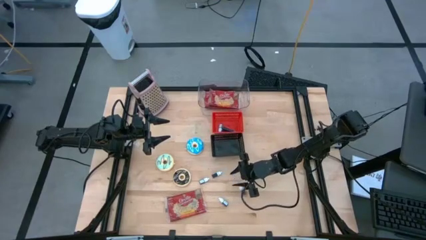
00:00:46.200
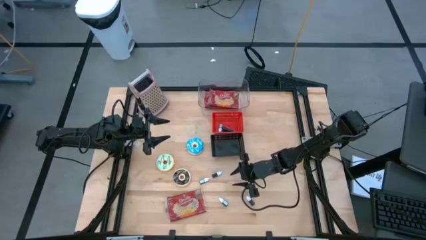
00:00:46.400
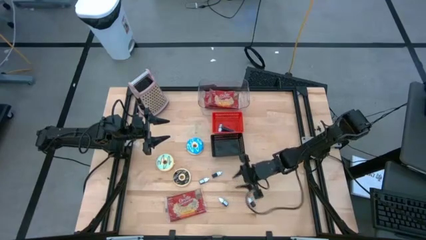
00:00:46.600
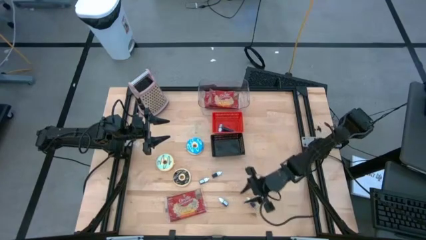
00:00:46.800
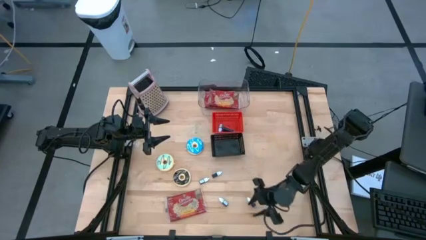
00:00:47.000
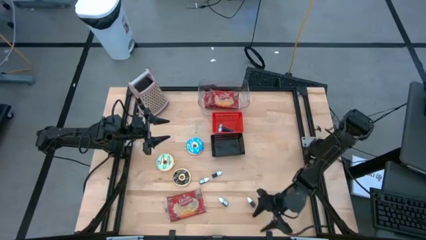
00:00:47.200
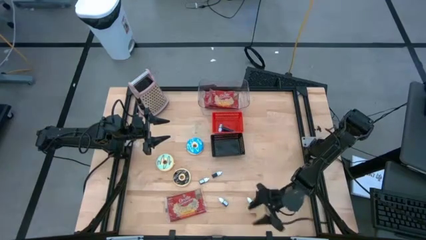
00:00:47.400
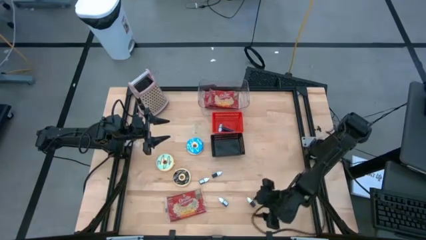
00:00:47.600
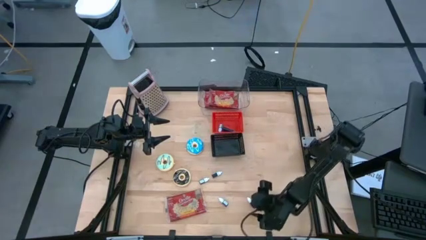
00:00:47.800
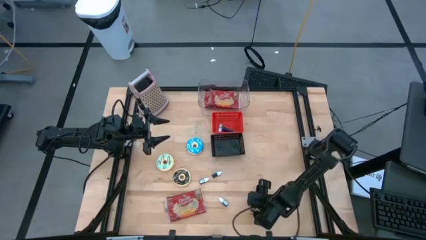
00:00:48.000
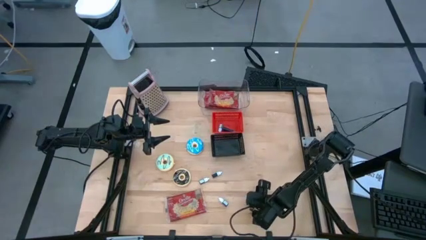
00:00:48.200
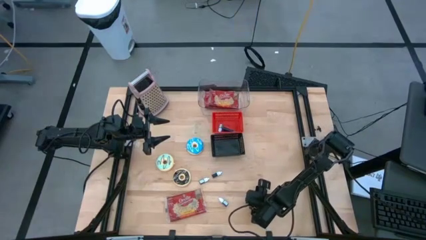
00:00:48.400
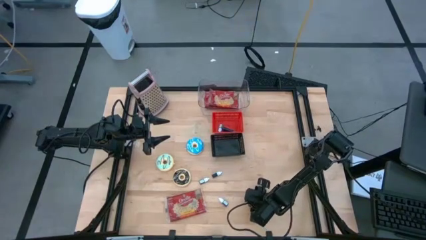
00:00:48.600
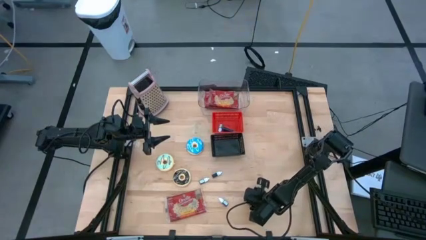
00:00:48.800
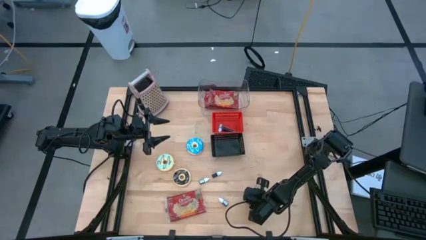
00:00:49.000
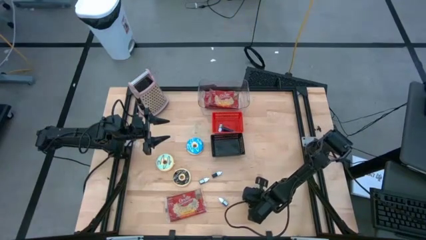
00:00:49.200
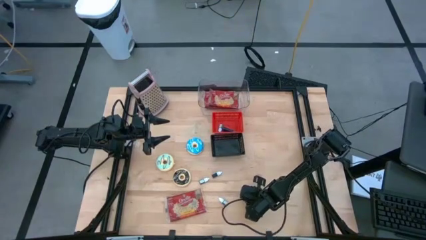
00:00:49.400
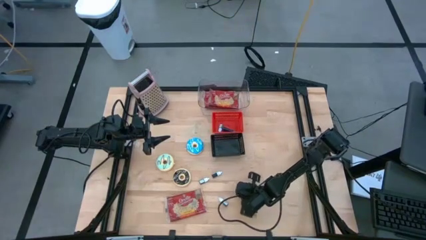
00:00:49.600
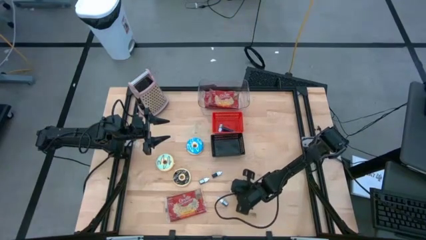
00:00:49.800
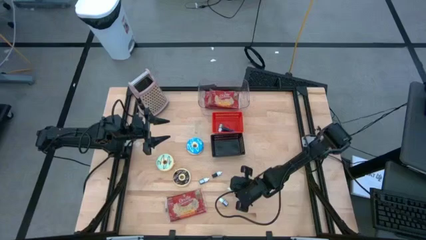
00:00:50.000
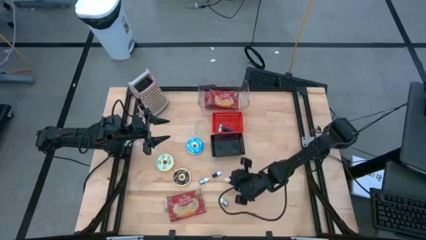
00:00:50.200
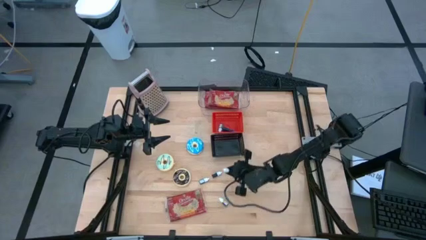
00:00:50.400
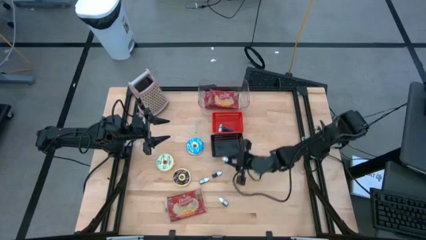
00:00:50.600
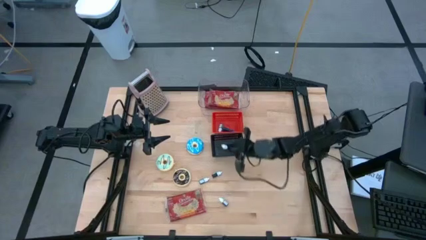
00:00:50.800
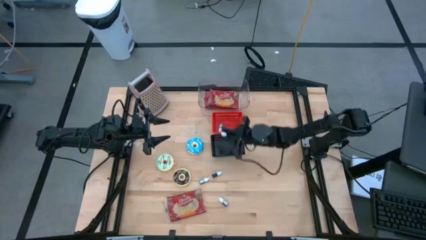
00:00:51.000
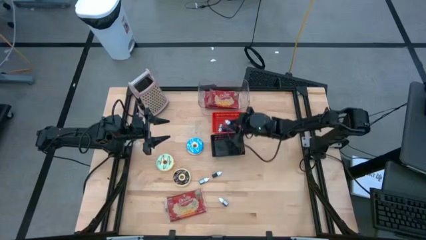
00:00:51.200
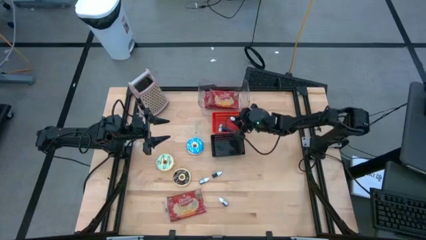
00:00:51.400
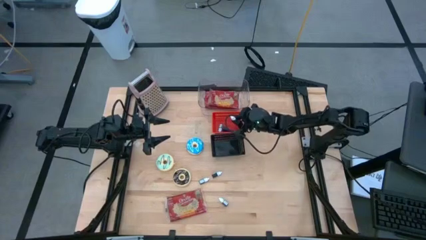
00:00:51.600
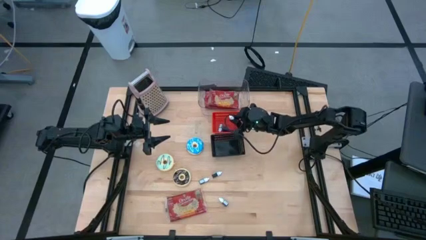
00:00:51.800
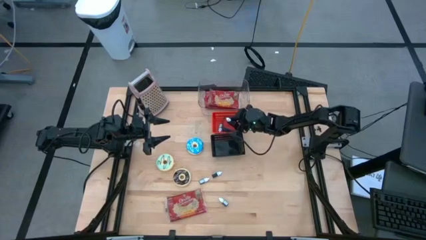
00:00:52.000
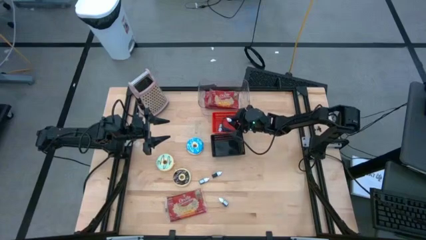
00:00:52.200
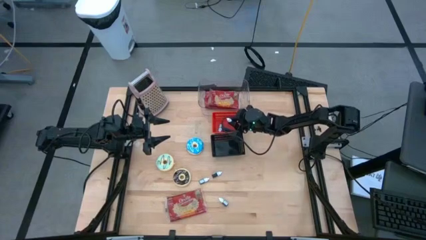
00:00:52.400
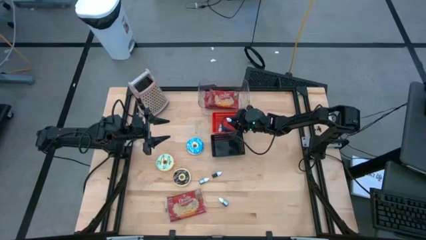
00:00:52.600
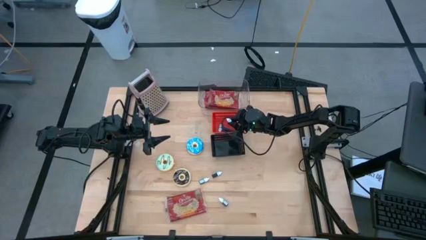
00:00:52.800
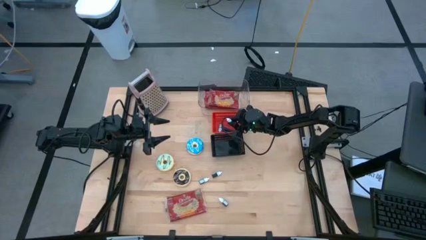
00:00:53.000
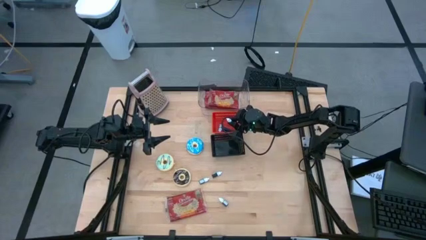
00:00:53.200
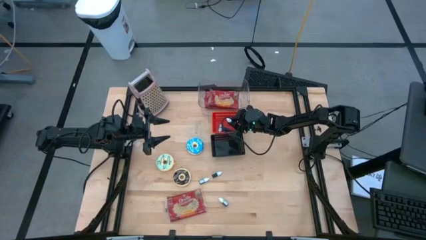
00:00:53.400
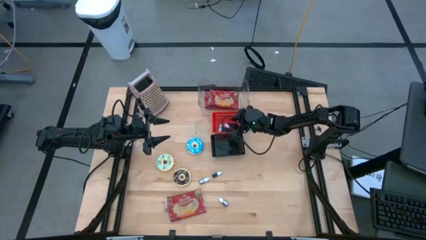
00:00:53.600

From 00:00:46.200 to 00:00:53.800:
Put the violet food coloring into the red bin

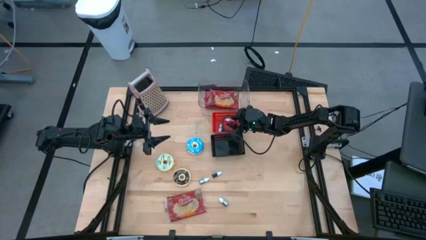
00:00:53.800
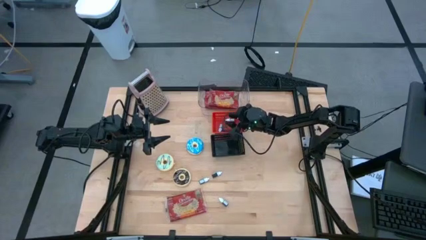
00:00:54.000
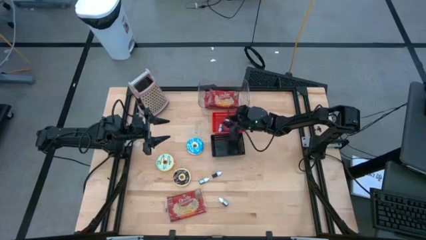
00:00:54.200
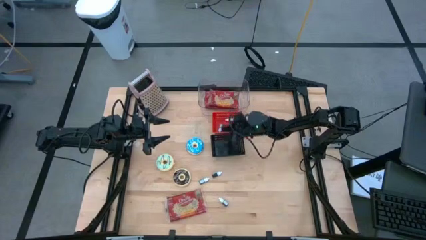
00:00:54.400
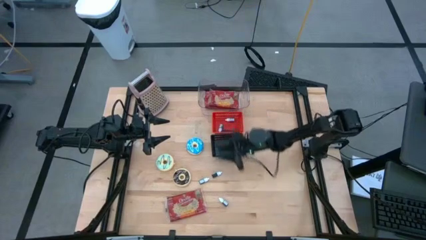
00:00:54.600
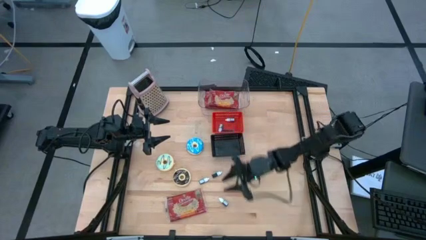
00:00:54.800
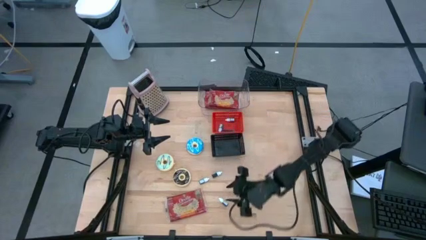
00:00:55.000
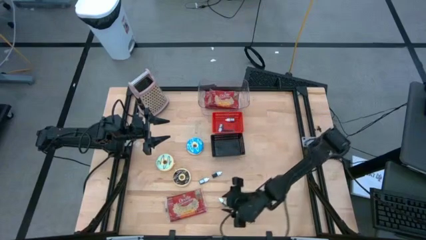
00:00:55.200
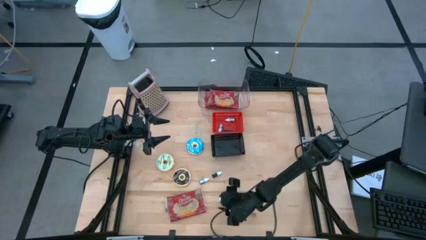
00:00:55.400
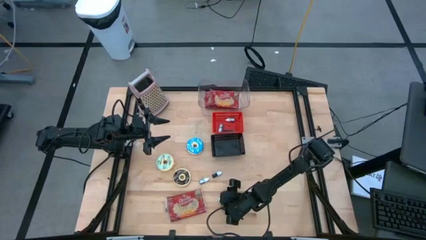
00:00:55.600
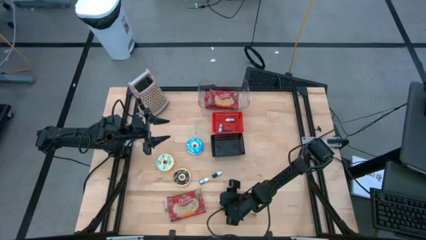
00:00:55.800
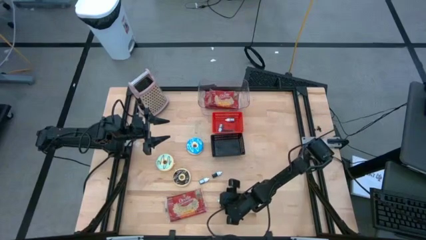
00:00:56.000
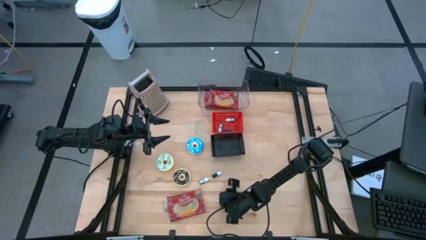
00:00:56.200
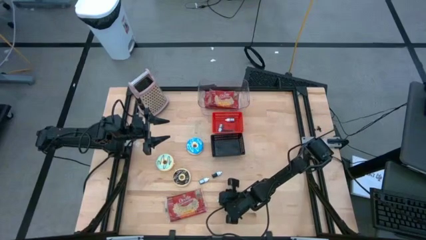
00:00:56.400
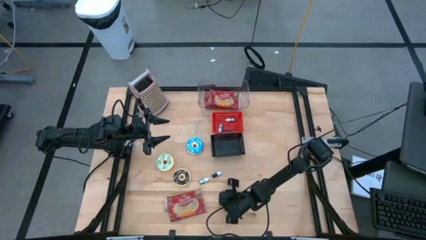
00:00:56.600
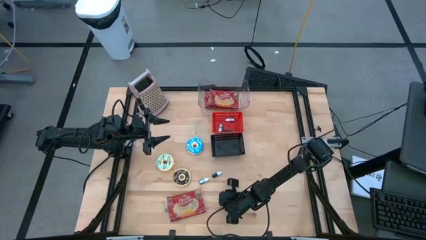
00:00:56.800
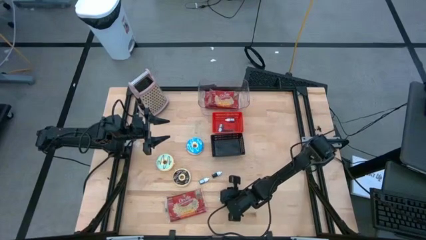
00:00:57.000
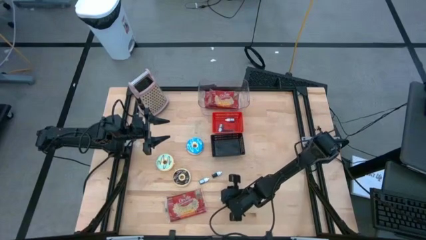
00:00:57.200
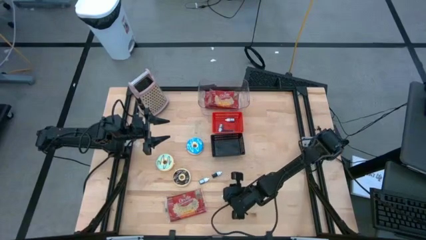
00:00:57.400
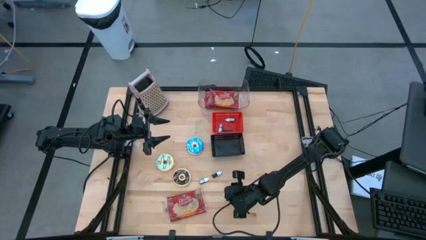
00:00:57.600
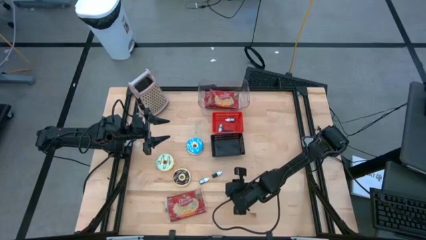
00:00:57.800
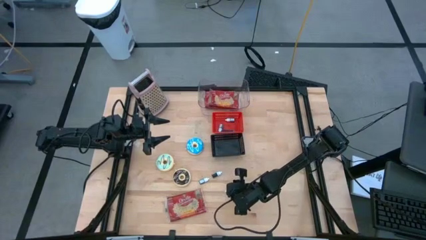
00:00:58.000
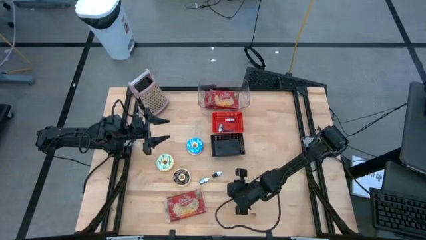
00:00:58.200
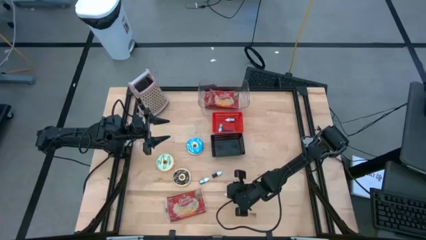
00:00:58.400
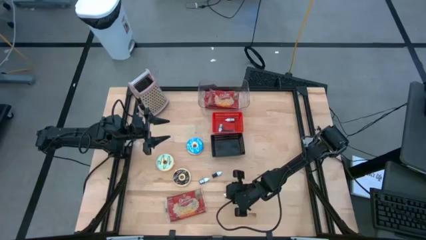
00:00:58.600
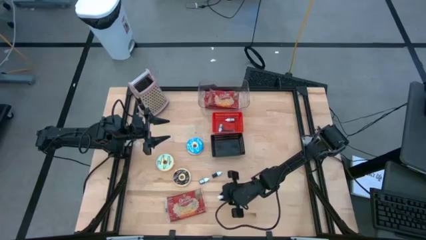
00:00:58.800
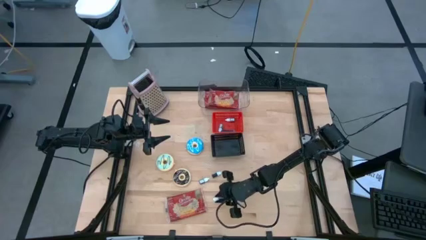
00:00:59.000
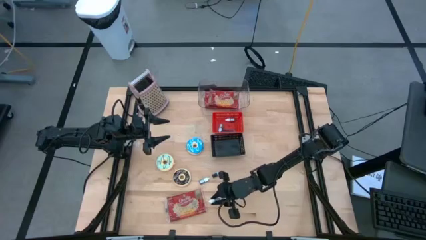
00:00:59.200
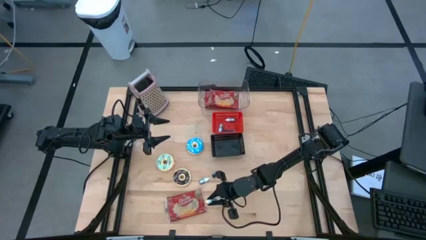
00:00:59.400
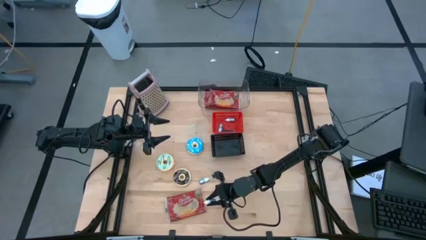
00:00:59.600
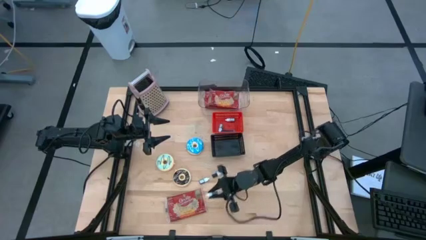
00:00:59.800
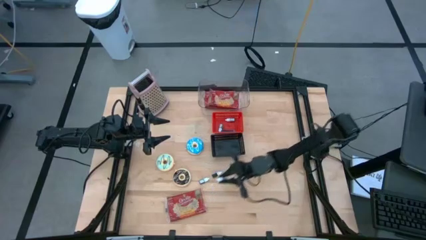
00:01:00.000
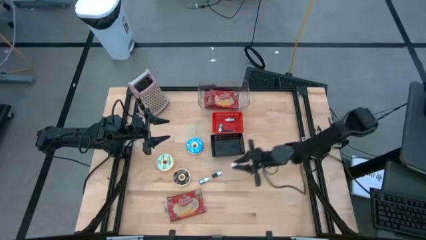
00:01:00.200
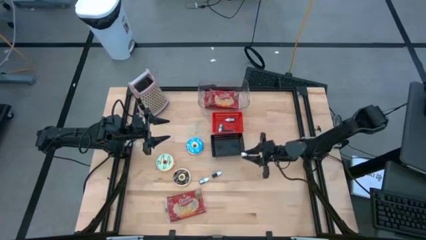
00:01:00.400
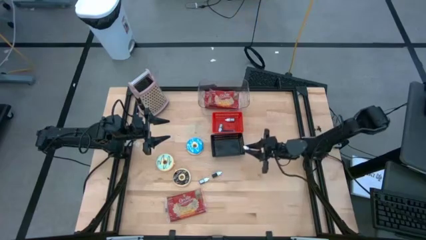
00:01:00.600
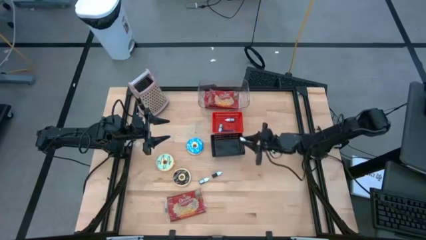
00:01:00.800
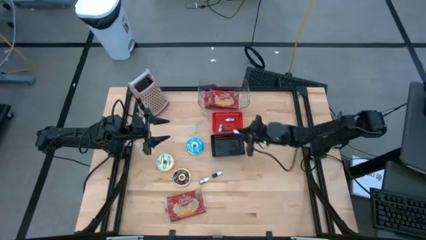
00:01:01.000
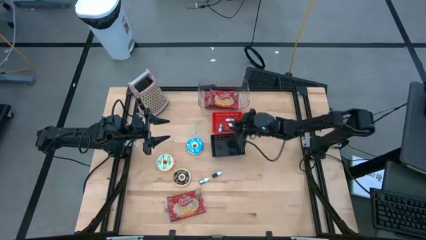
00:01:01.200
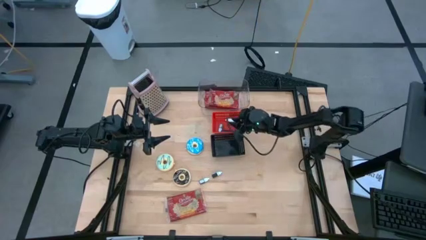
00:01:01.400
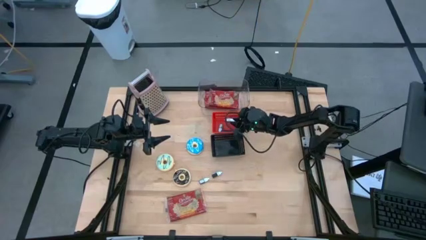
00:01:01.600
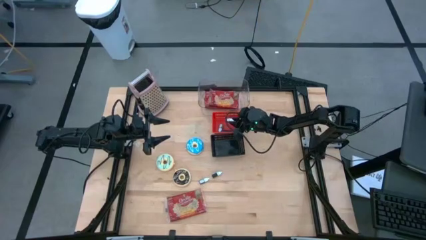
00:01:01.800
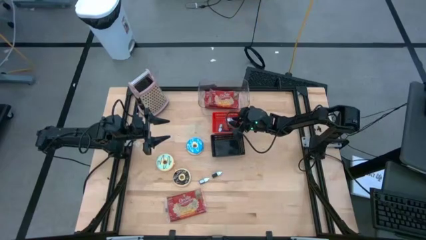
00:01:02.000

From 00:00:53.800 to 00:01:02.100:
Put the dark blue food coloring into the red bin
